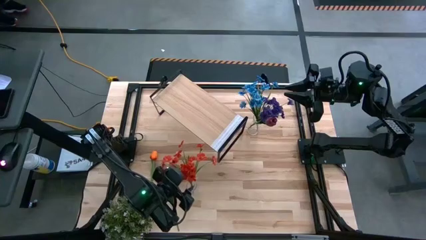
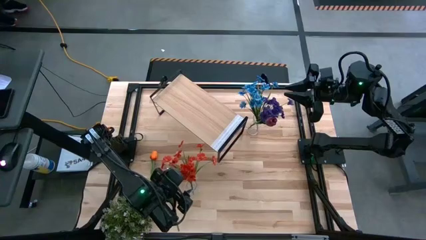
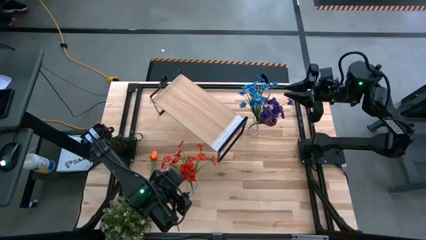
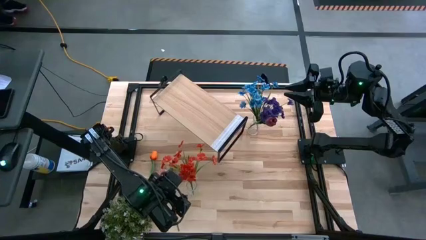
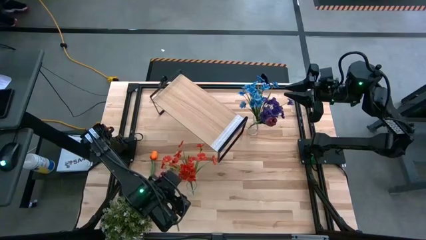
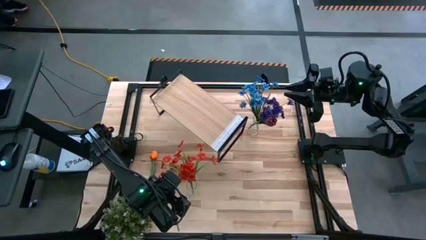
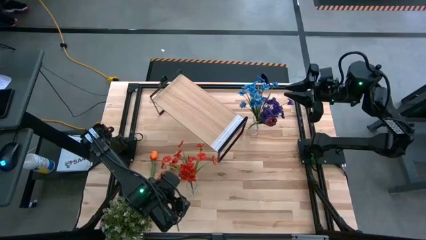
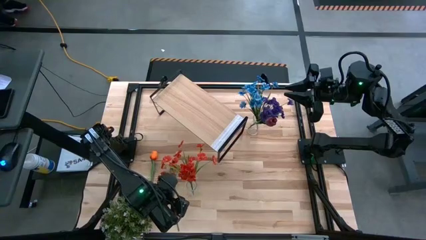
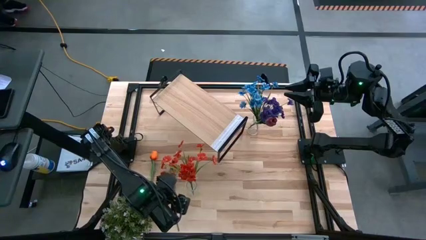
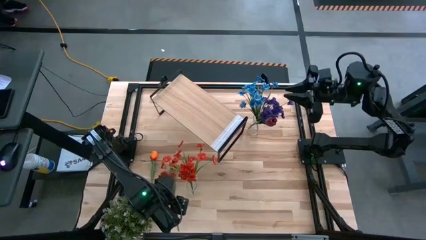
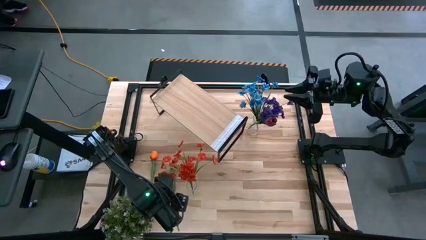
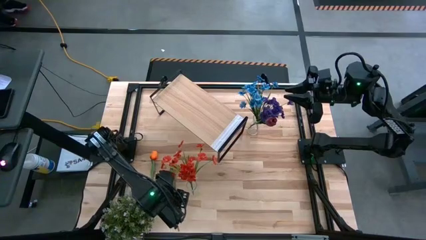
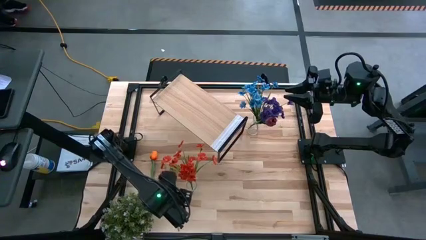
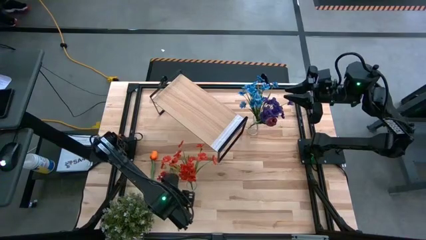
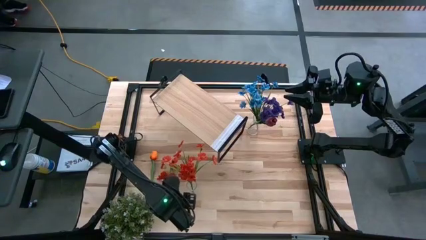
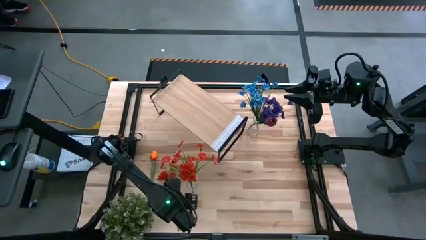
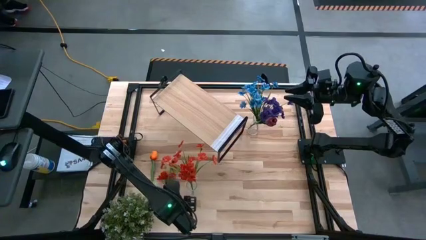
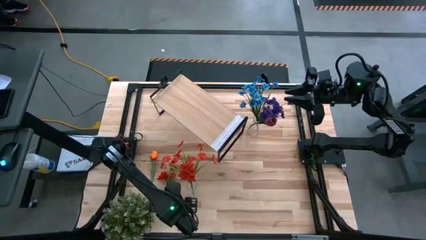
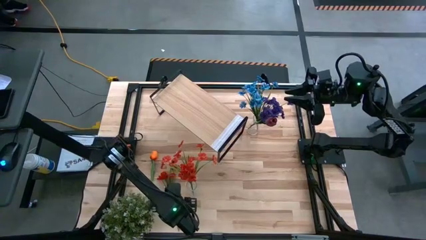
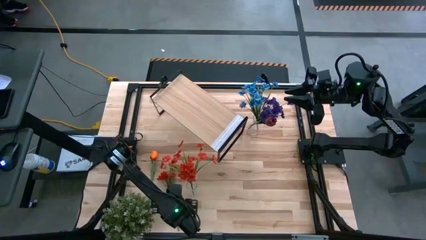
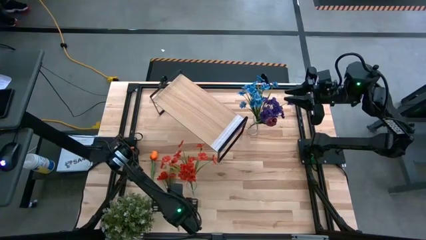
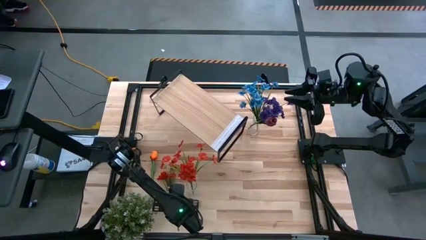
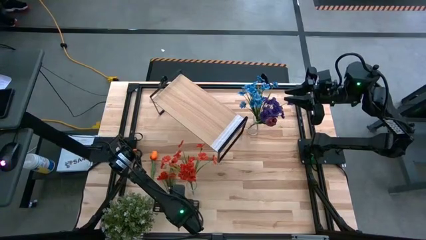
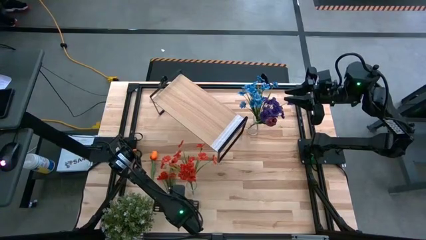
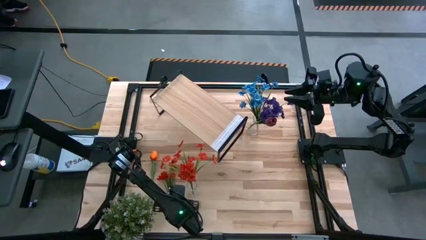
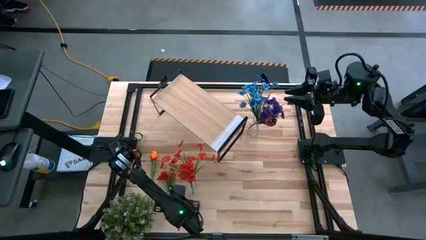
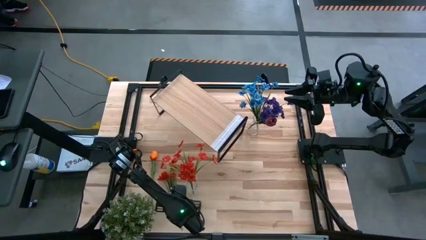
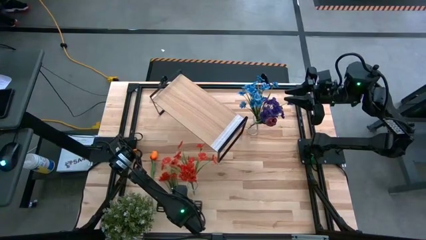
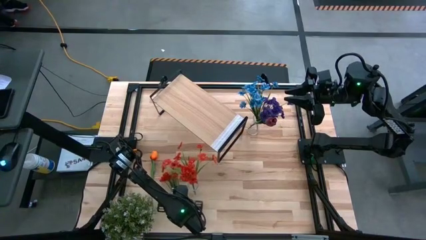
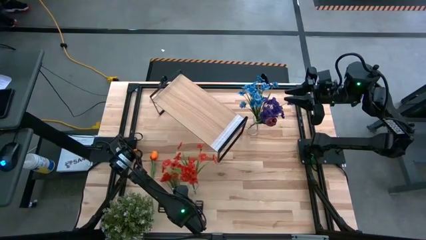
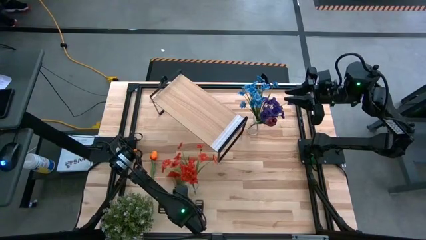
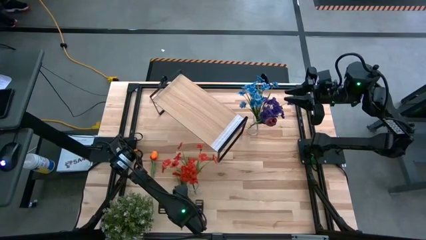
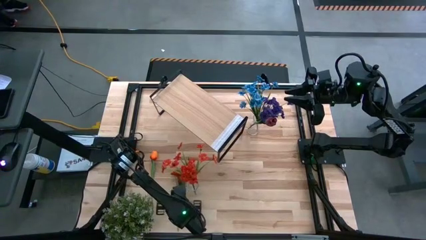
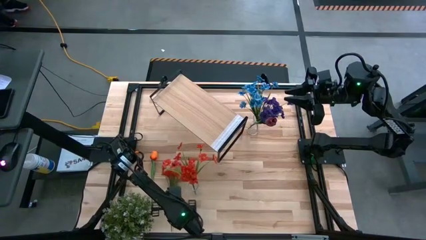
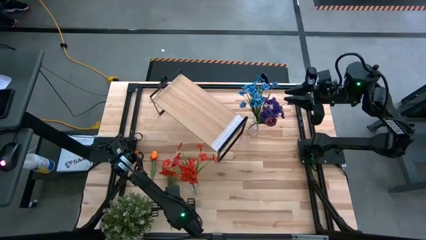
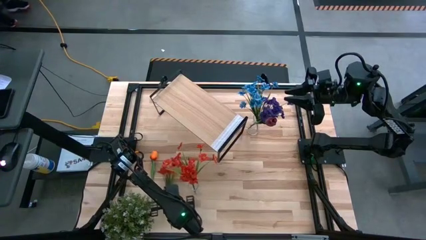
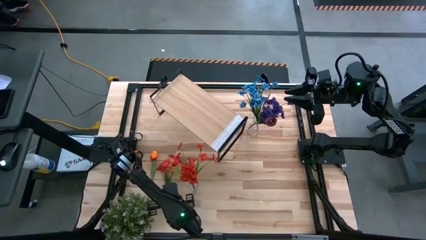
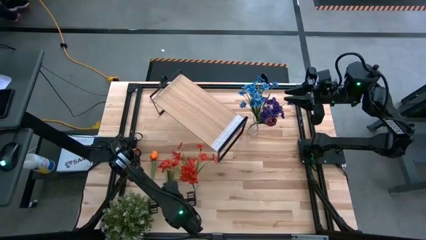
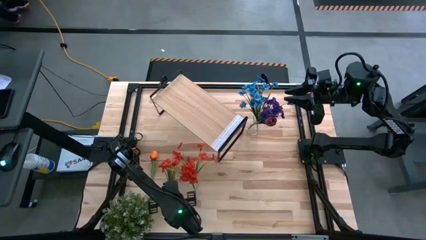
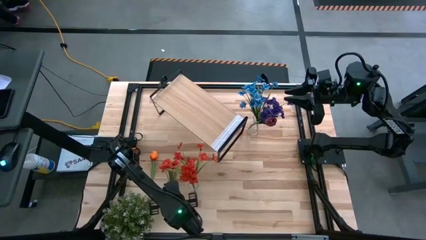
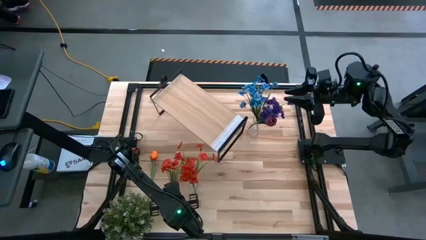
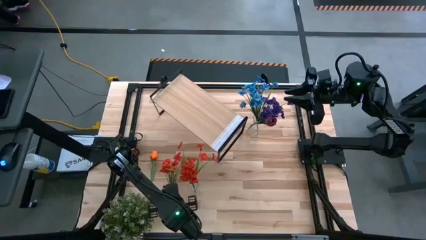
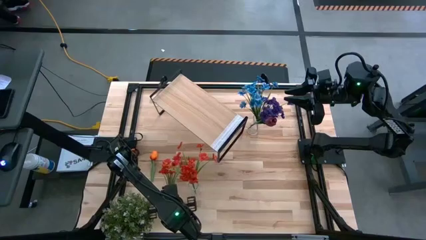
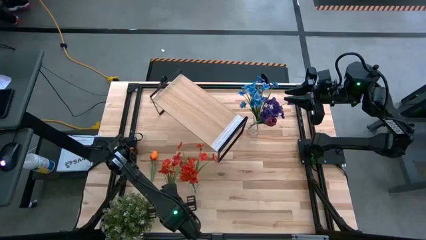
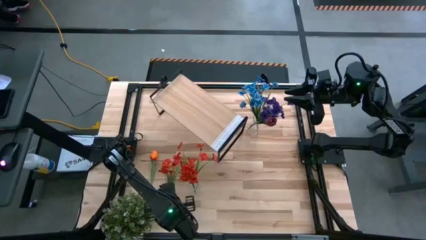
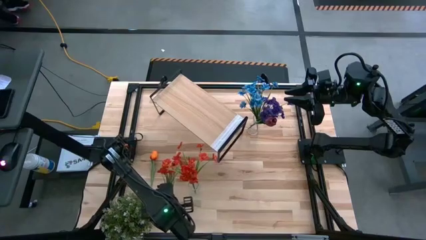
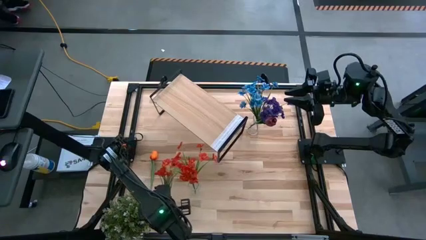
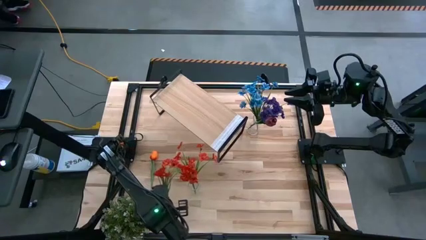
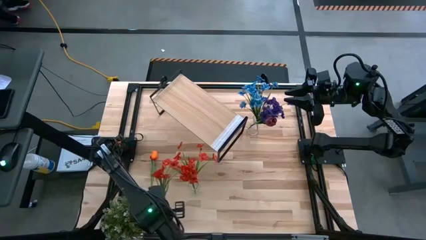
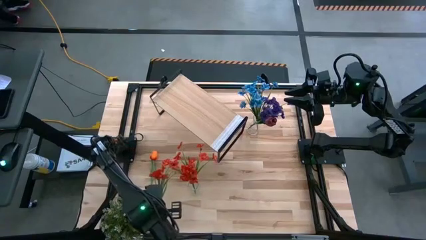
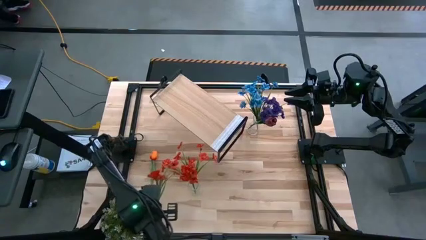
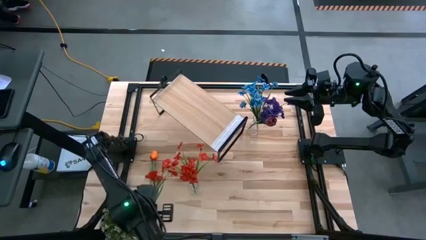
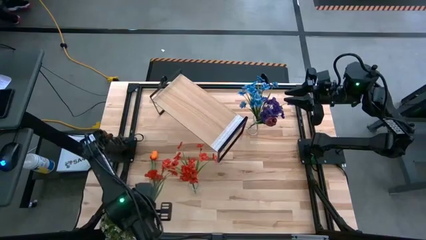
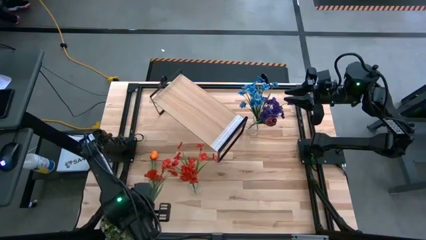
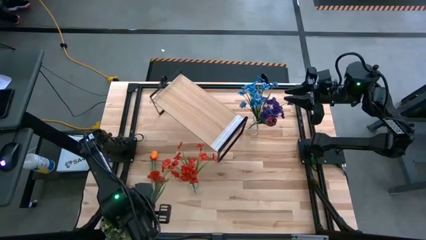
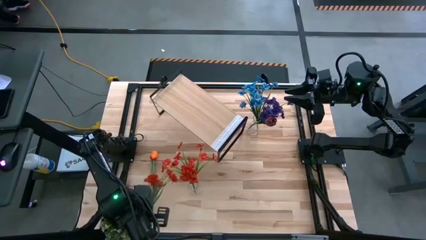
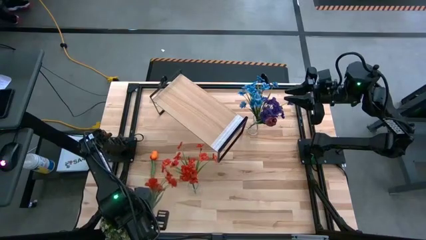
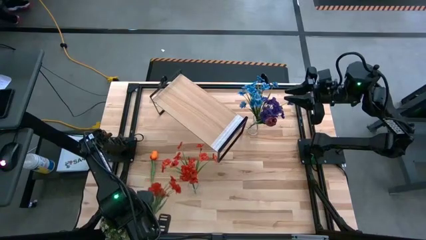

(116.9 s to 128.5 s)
Task: Pick and place flowers into a vace then onto a shelf
Put the red flowers into the bottom transparent vase

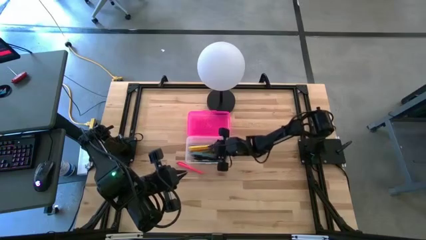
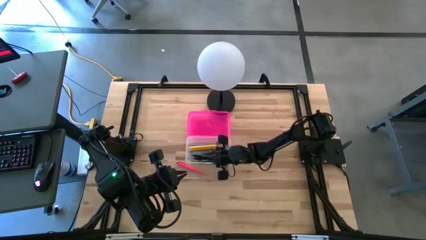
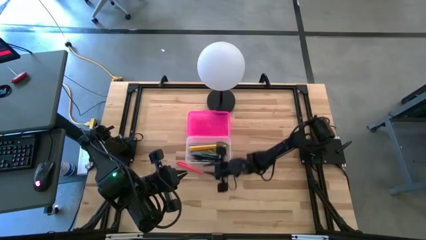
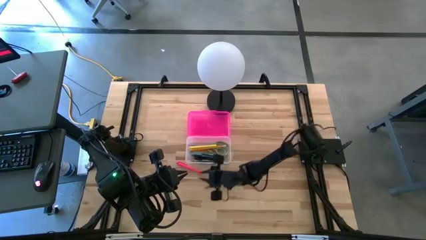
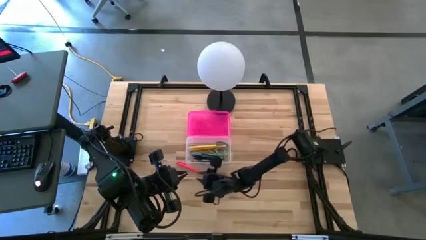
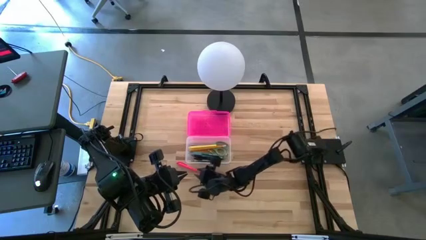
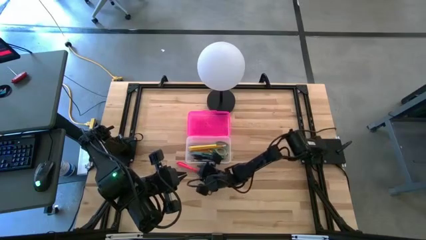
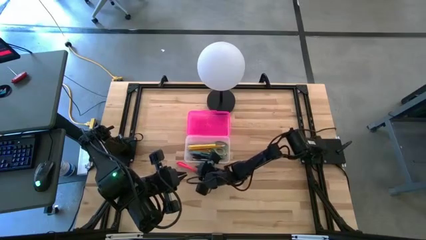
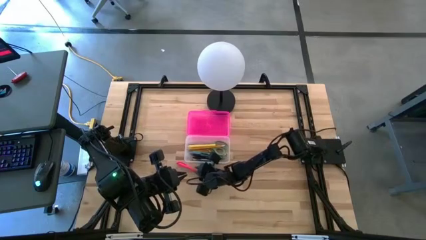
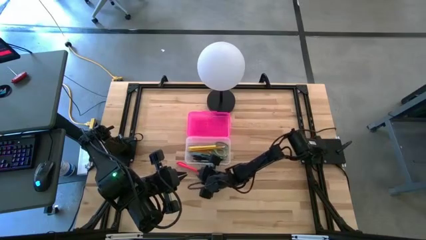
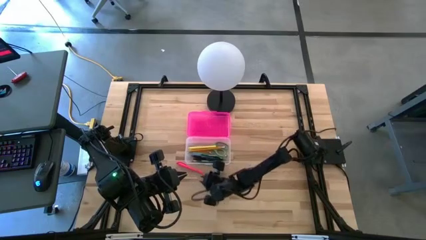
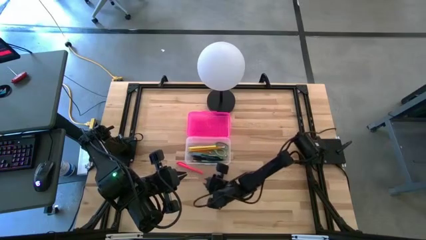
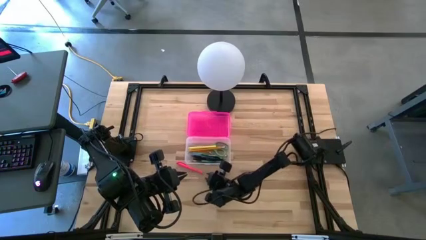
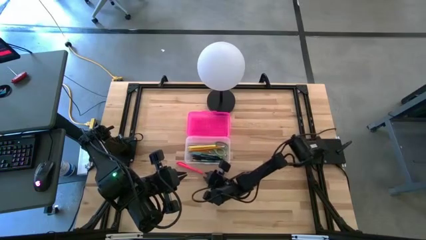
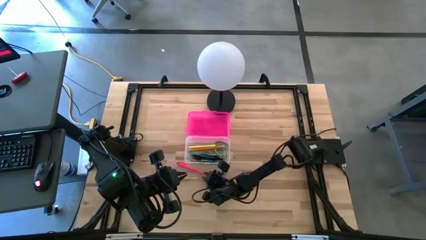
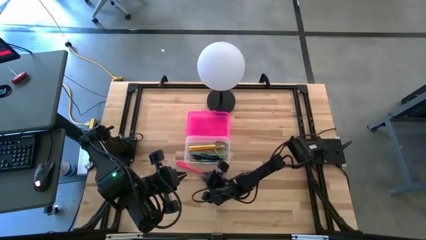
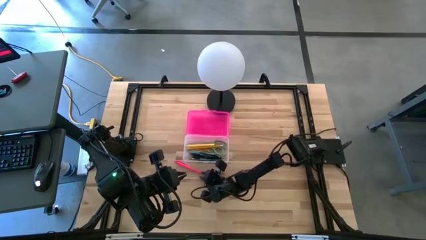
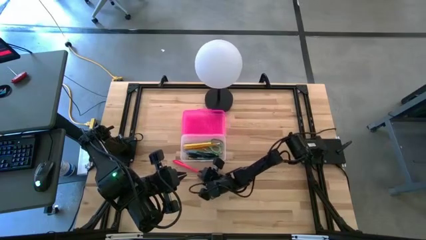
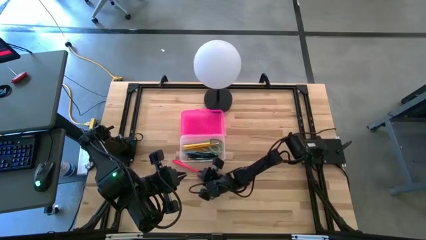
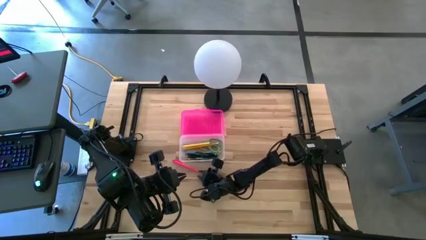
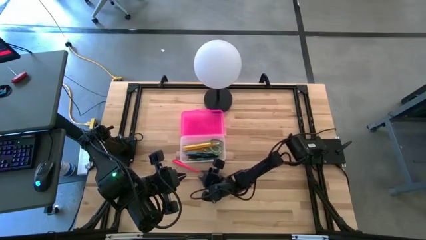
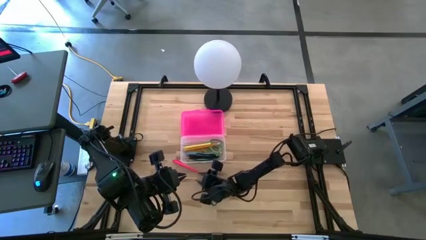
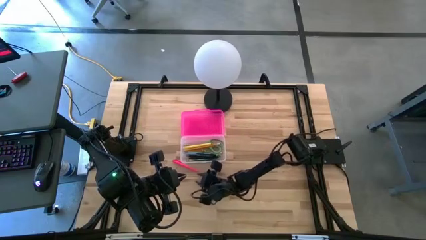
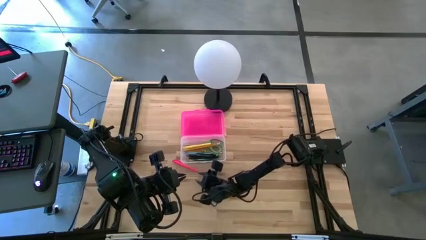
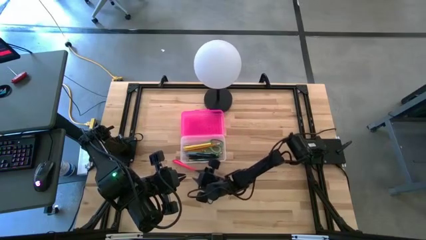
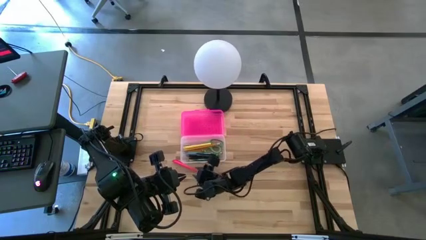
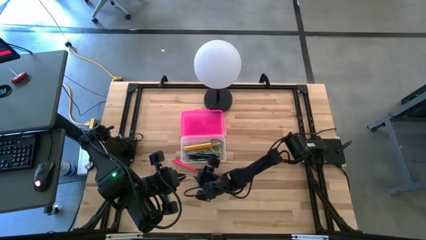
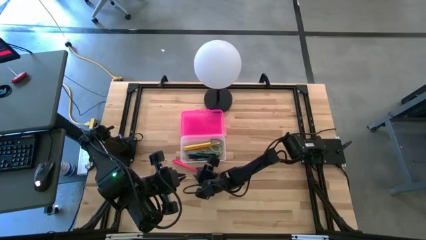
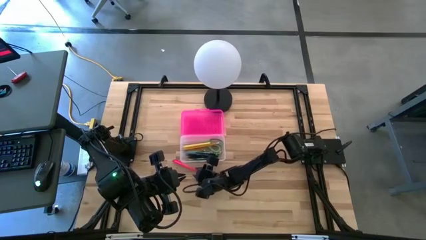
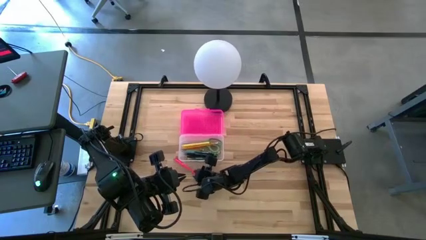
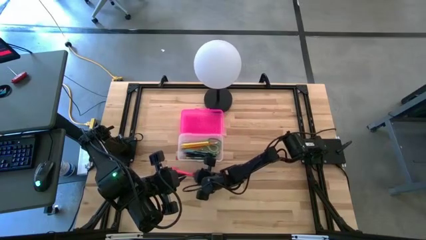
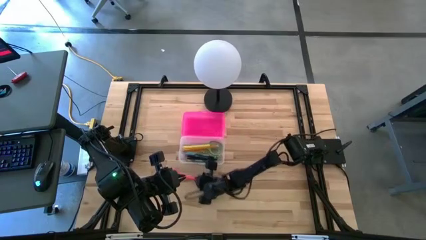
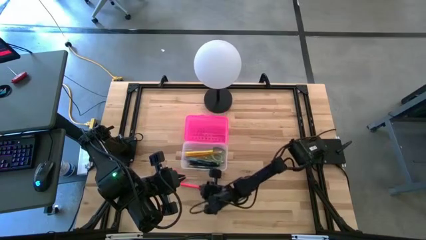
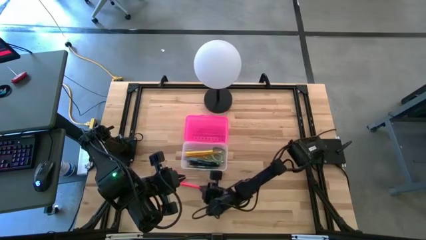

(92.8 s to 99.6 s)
Task: Pick & place school supplies into a supply box
Put the pink pen into the pink supply box
